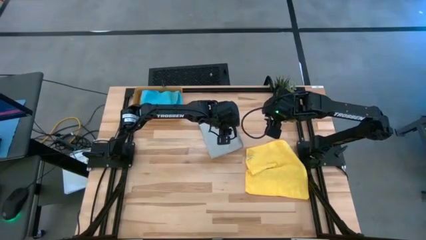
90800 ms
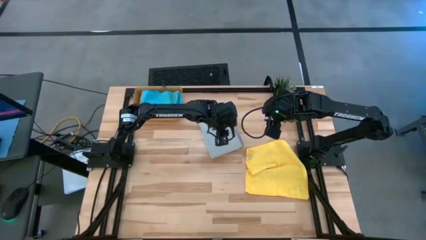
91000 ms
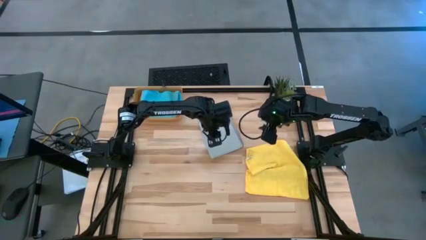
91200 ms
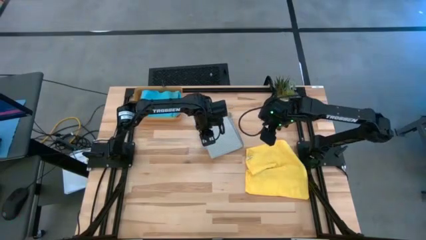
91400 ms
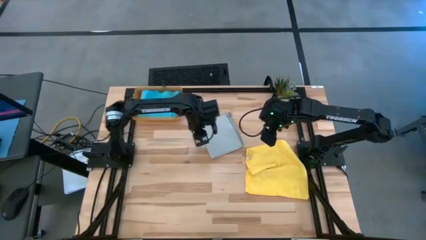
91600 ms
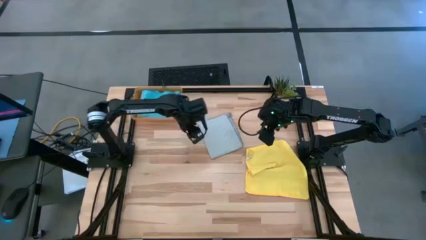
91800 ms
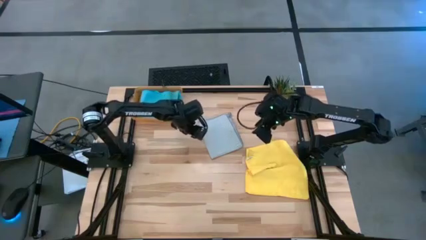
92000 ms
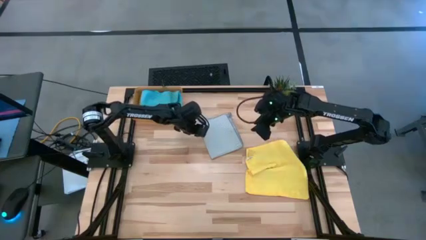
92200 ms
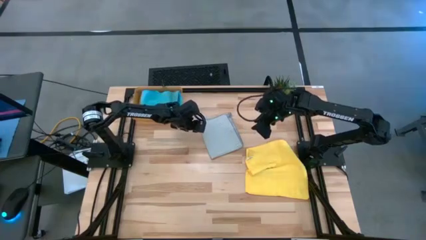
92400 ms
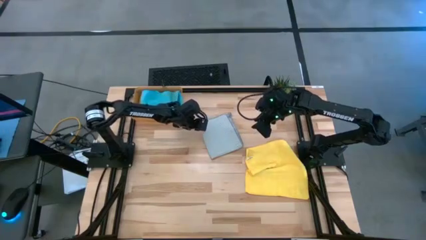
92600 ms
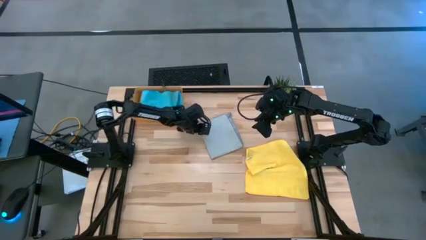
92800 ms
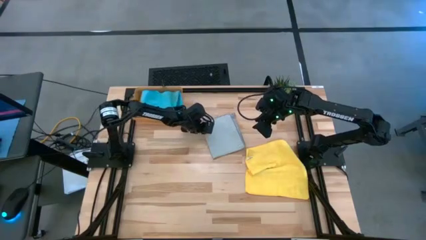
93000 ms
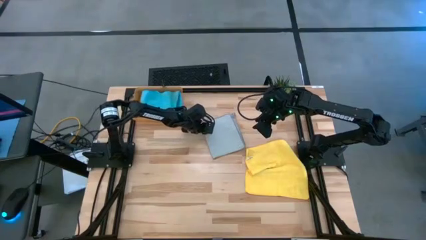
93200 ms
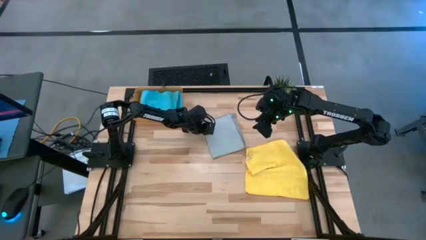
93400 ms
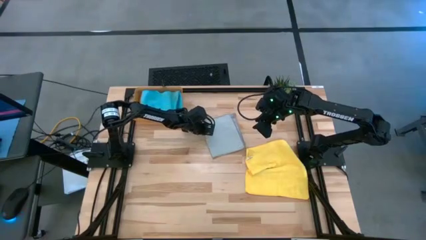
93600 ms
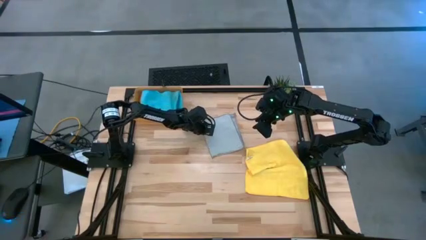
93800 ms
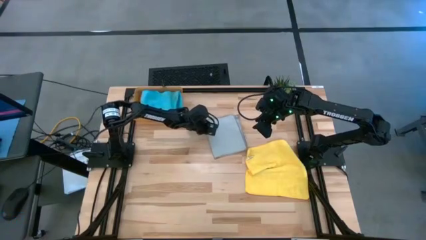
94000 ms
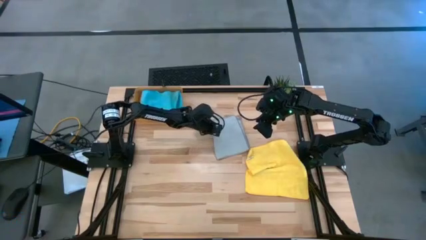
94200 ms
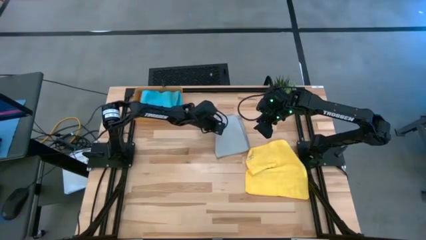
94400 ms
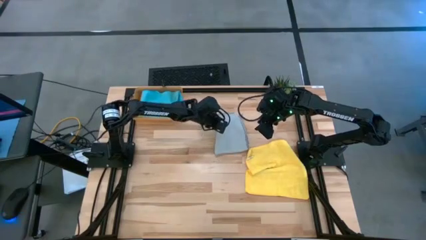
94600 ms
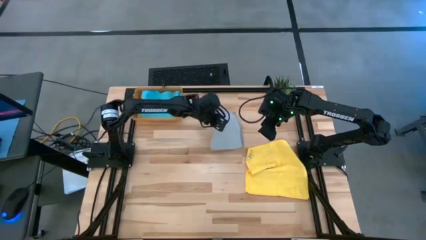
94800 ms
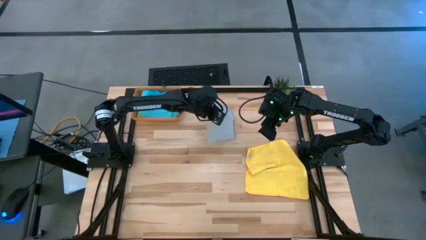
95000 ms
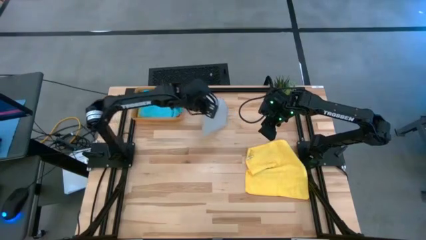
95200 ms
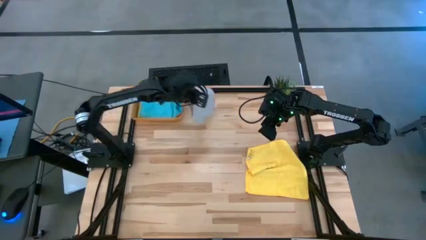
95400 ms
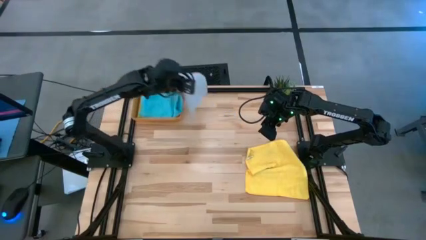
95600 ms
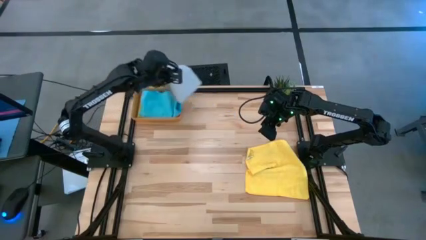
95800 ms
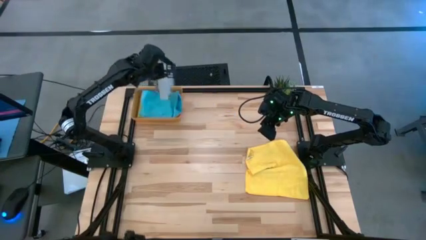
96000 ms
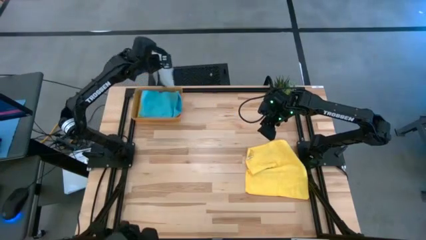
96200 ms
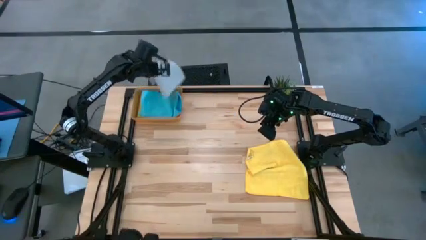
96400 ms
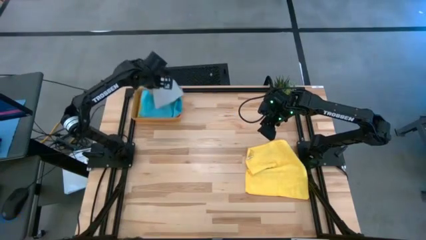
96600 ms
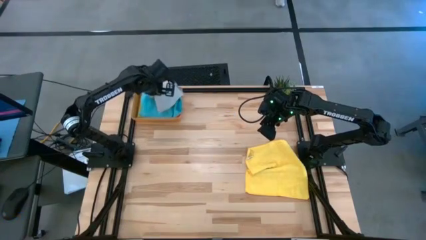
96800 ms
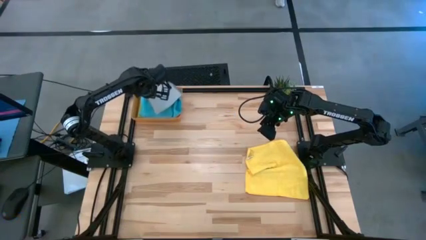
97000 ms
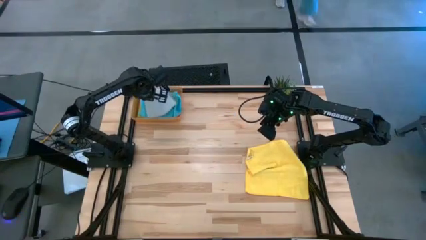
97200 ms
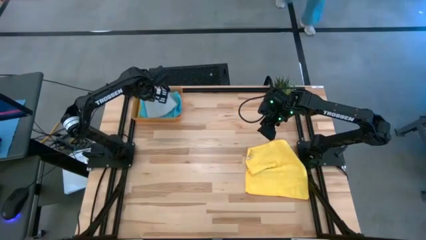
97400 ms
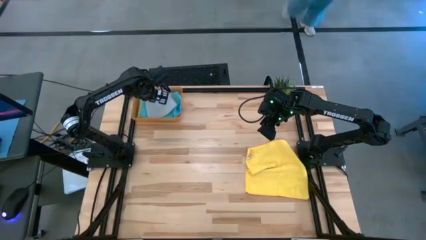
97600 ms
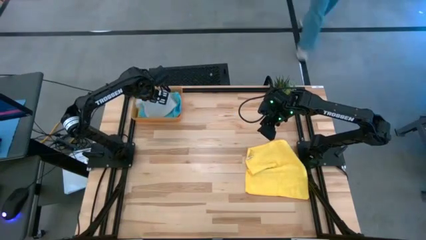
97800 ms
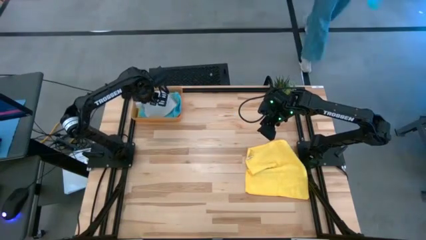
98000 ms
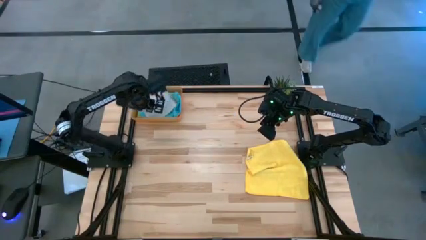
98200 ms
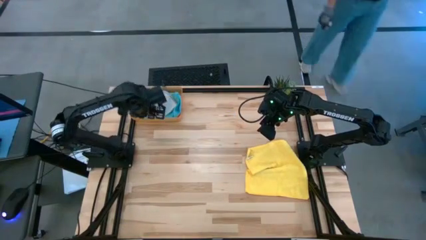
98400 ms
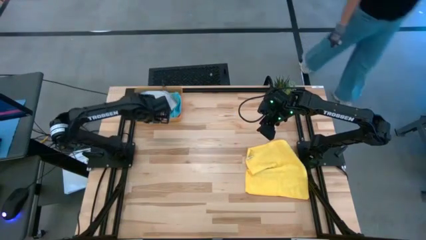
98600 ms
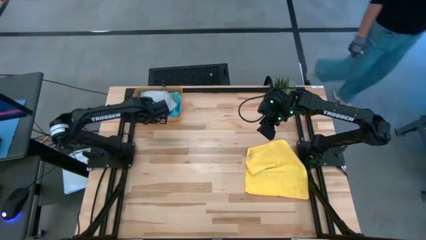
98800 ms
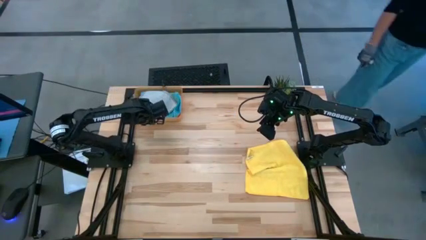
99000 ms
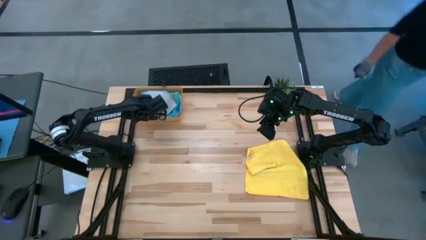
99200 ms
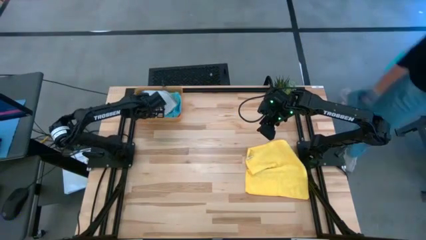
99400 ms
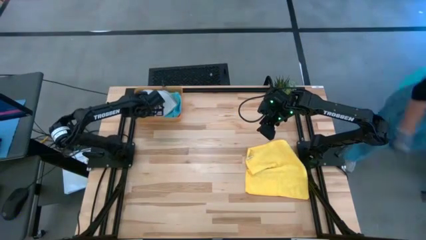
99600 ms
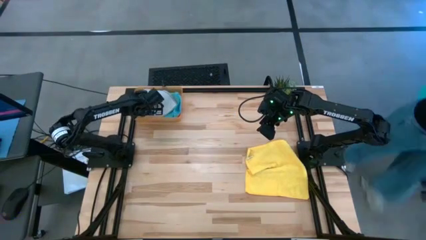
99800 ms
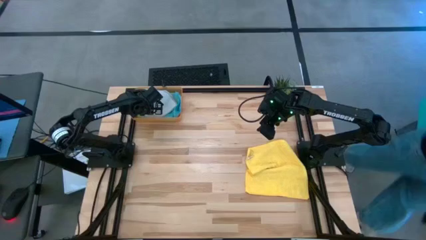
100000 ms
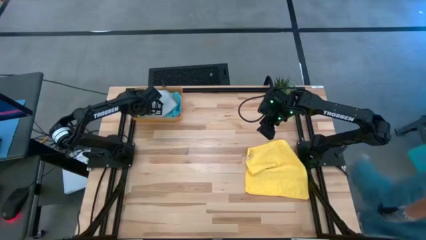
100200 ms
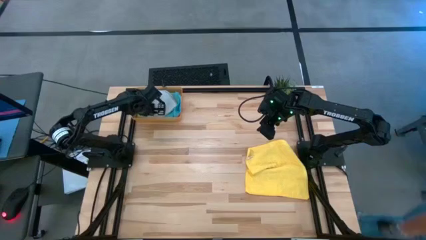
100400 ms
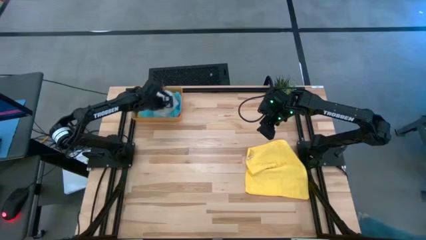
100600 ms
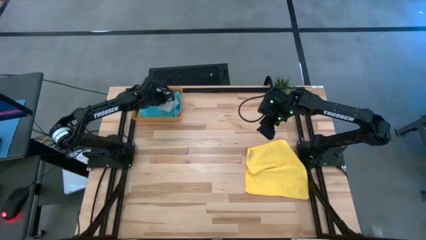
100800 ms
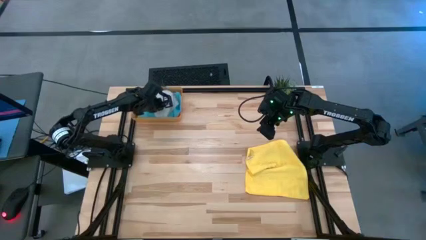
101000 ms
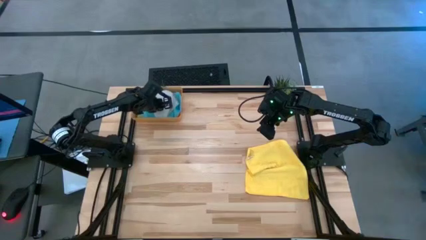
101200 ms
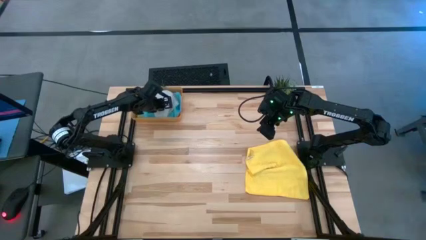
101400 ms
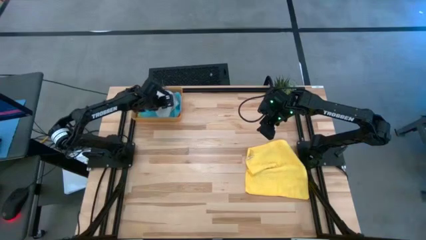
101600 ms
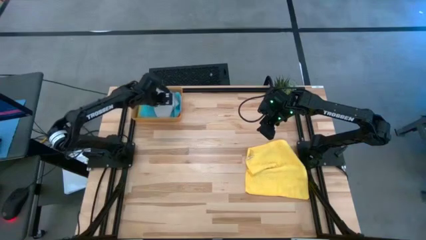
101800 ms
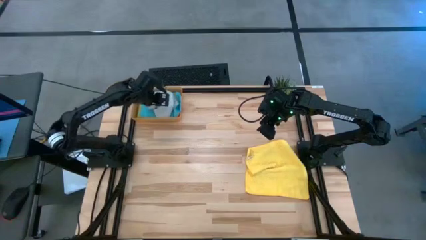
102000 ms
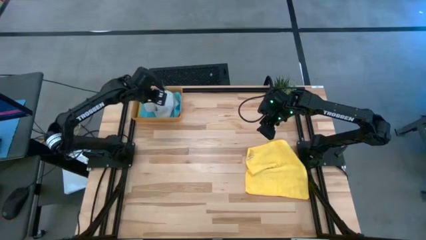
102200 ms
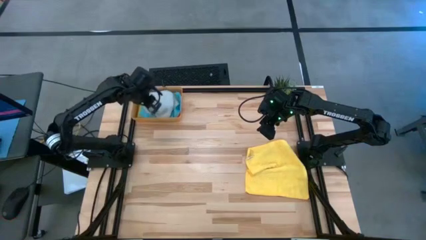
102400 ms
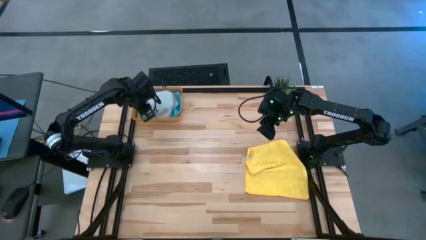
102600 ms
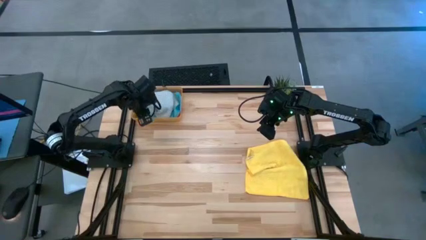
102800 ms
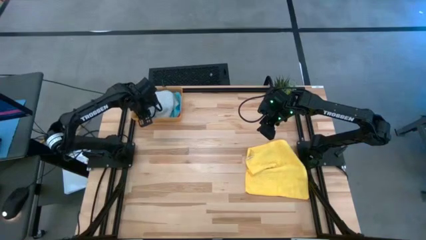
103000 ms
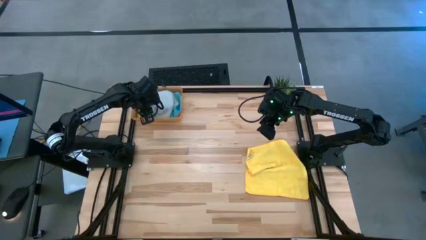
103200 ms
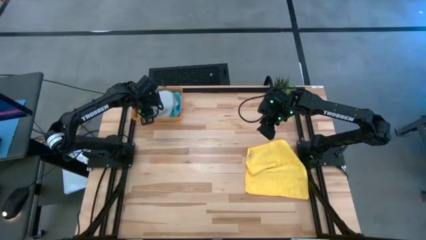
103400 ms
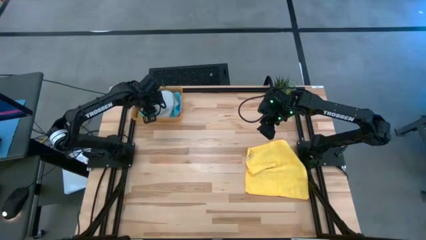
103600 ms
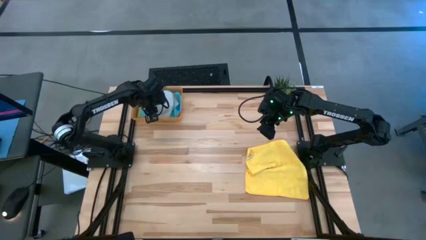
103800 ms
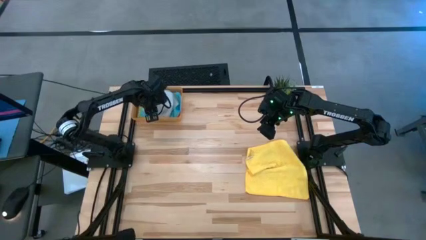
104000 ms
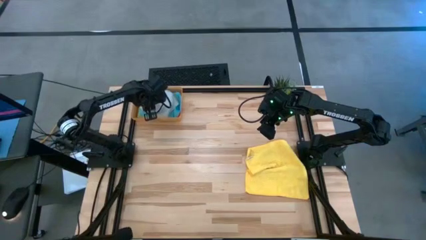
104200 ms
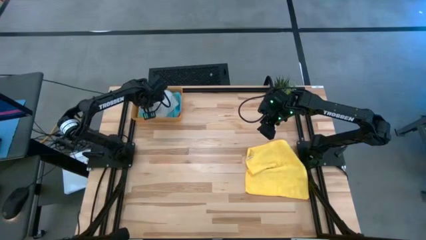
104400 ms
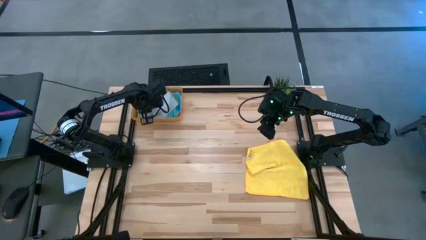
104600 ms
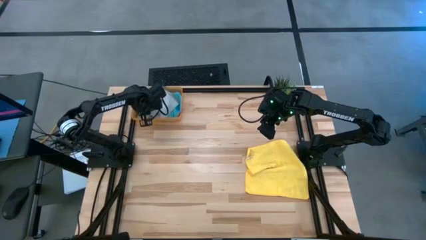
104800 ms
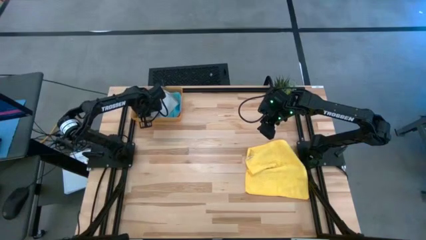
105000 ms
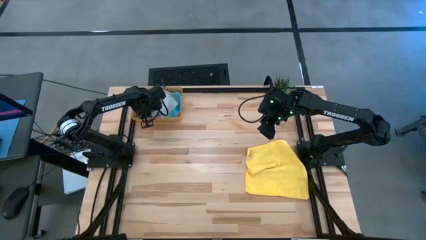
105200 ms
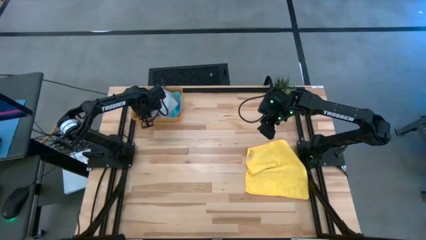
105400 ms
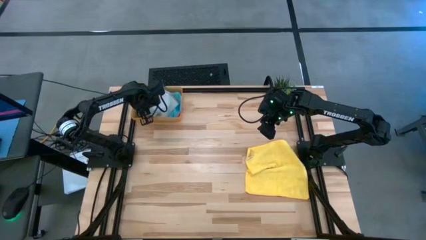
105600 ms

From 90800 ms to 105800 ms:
Task: Fold microfiber towels
Put the gray microfiber towel into the orange bin
